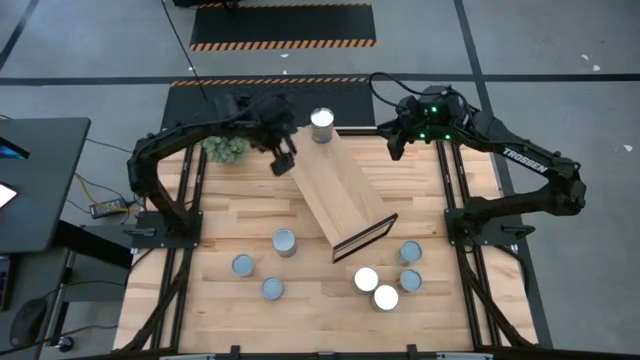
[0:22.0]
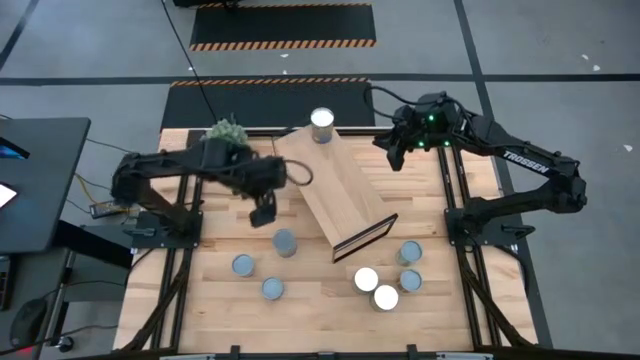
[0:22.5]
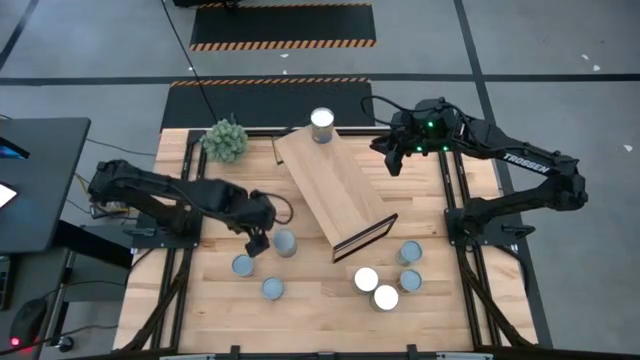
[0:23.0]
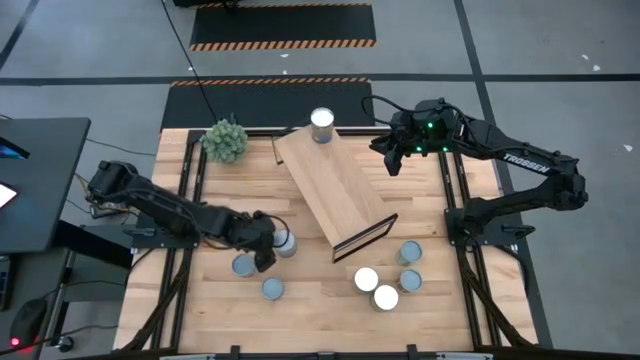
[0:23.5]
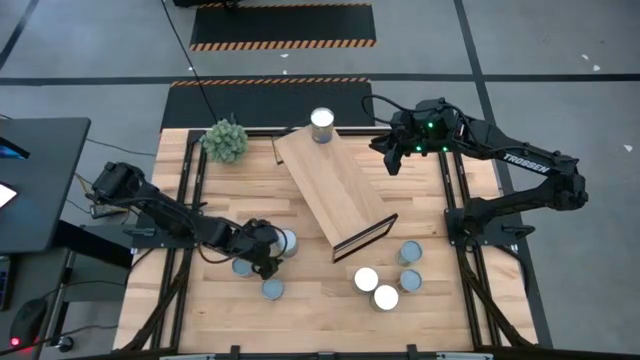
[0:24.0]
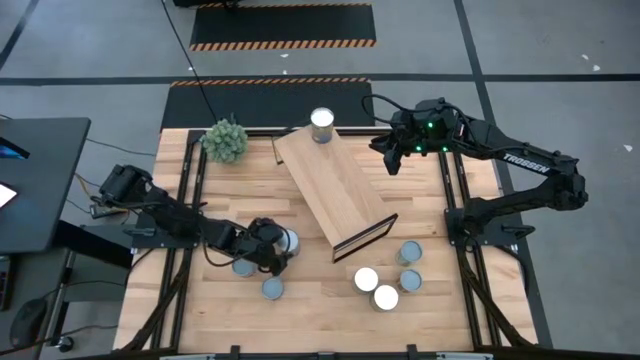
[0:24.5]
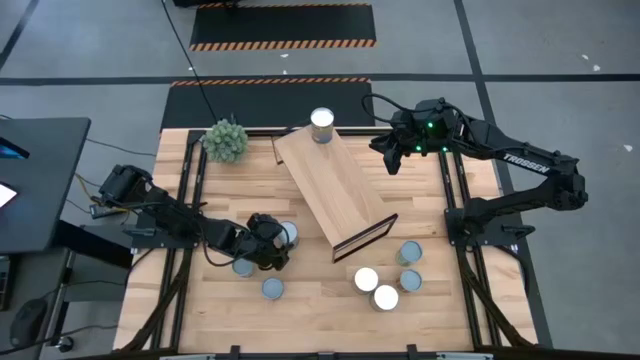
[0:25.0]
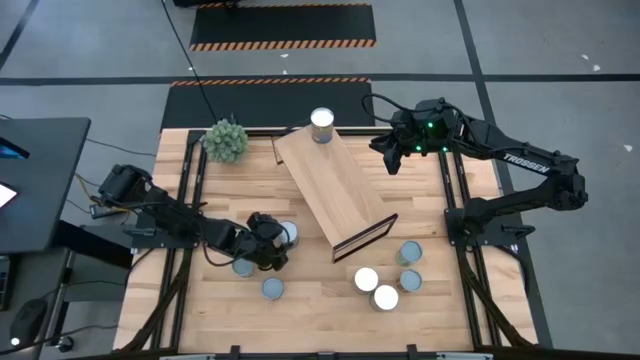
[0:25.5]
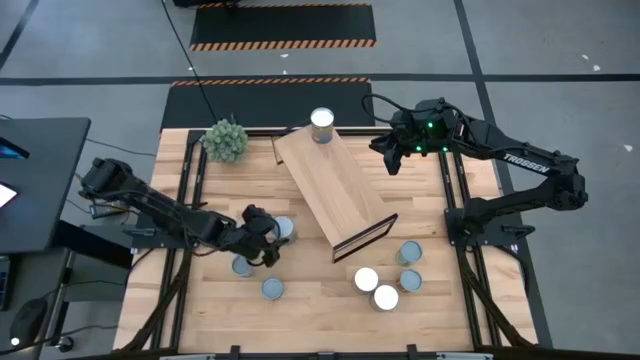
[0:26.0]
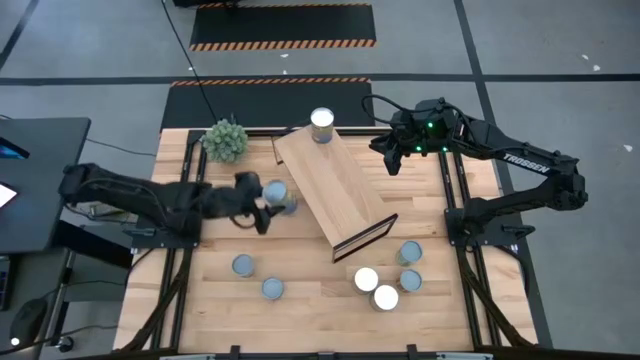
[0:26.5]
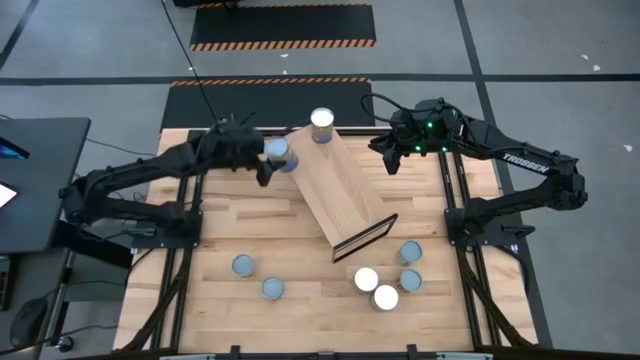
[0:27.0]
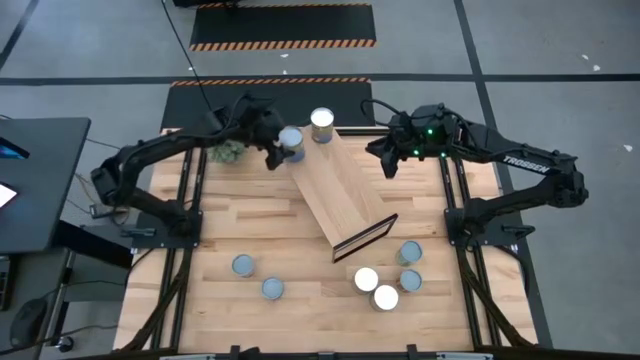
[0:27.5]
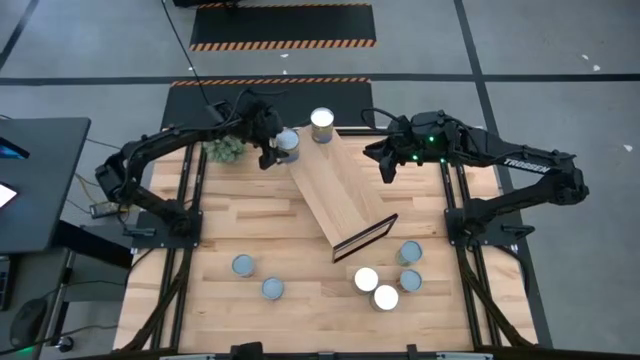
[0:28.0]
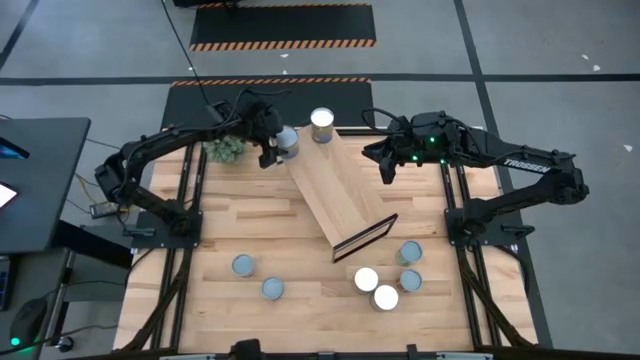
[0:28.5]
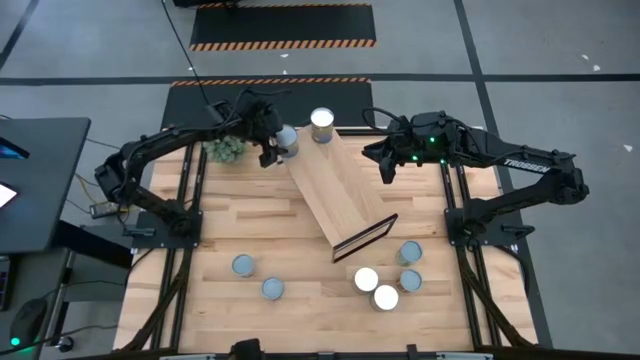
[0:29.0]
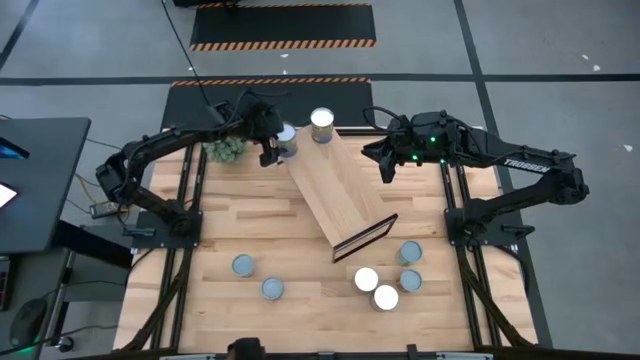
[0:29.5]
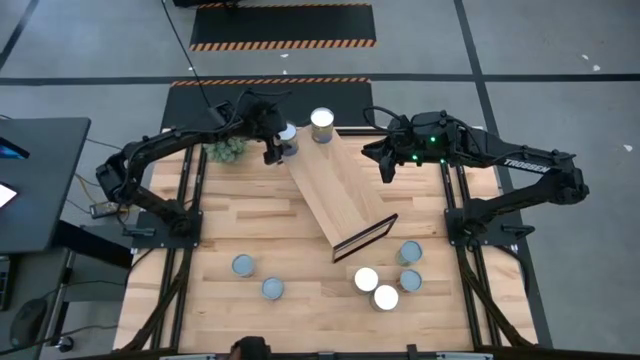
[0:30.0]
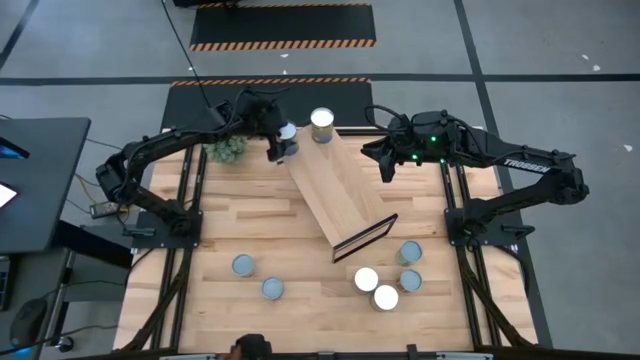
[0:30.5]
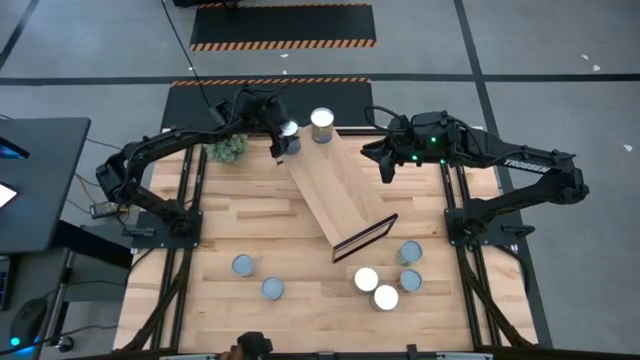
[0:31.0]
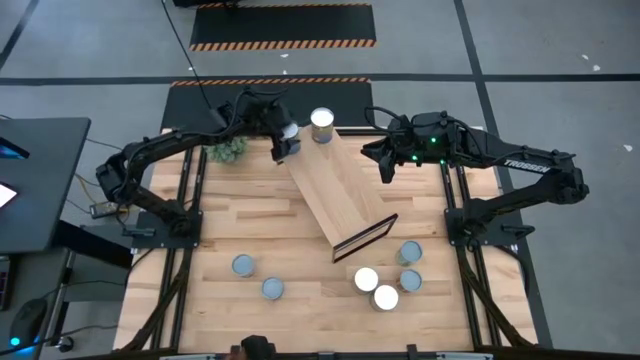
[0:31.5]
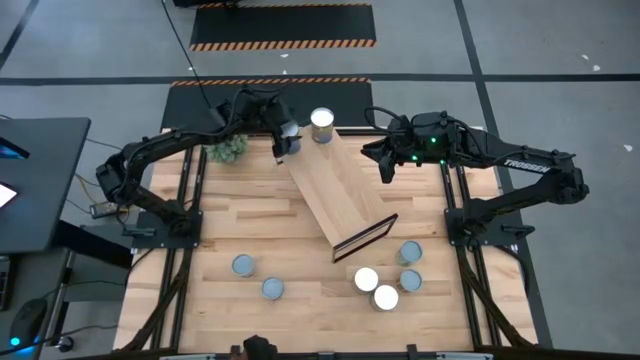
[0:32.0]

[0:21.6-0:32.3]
Task: Pick and place cans onto a shelf
Put the canned peas on the shelf

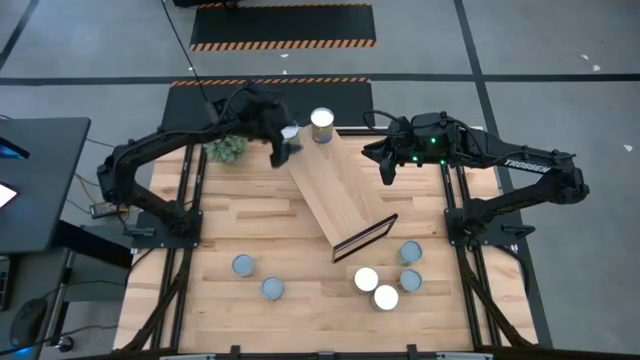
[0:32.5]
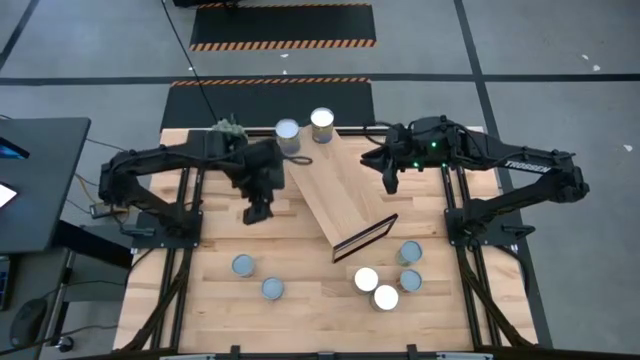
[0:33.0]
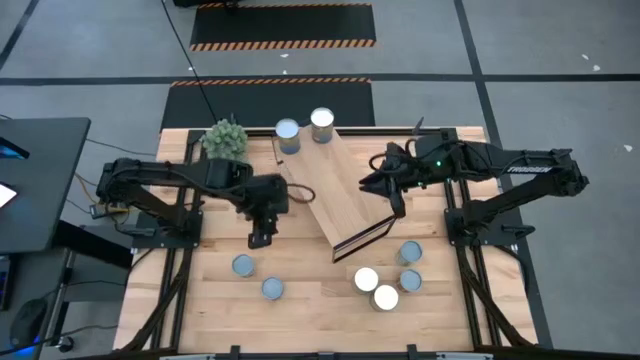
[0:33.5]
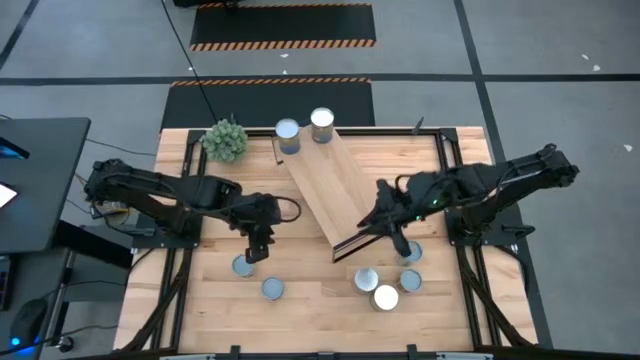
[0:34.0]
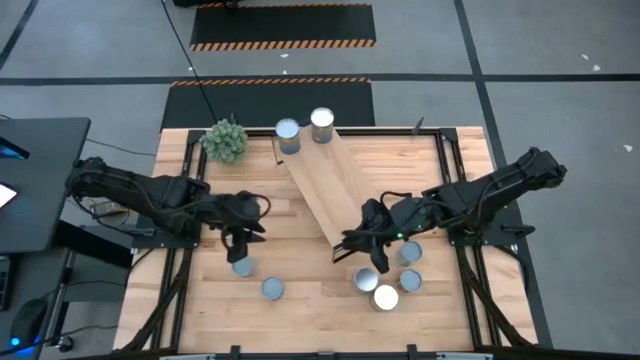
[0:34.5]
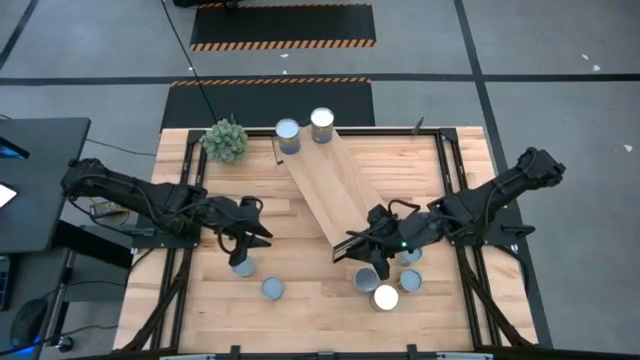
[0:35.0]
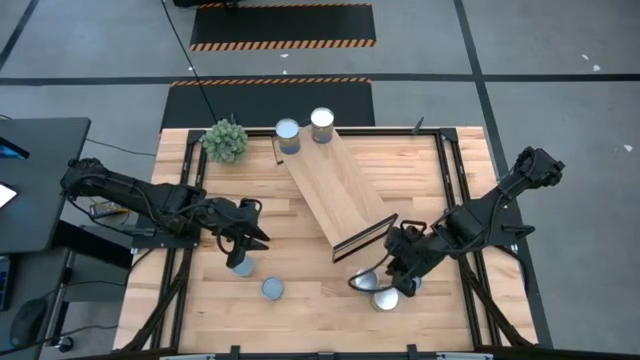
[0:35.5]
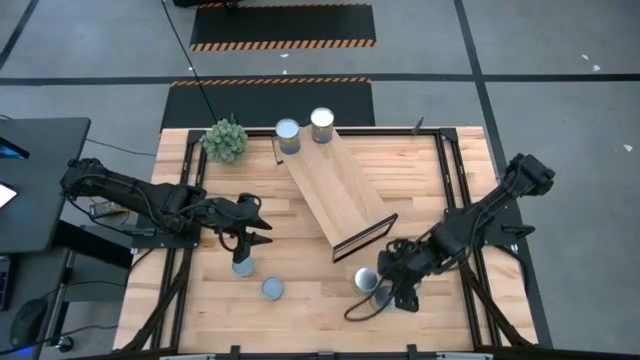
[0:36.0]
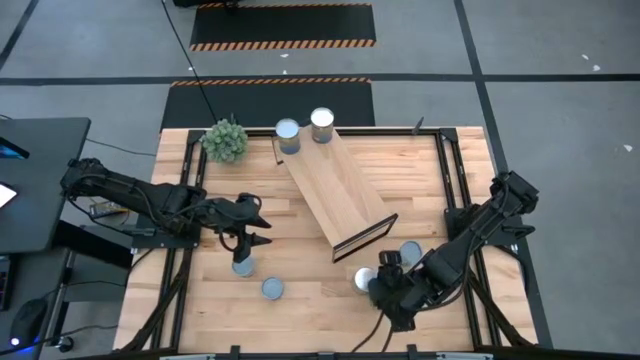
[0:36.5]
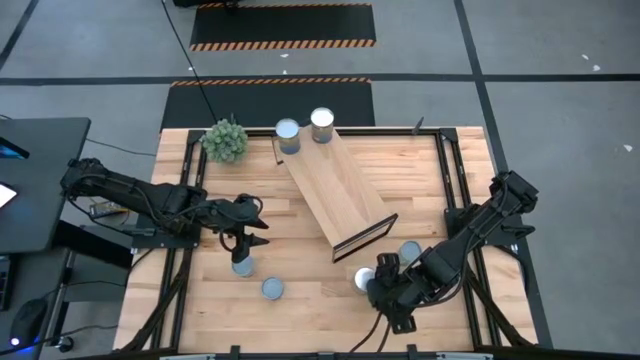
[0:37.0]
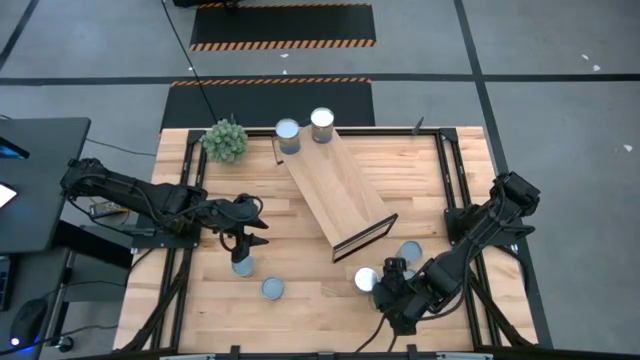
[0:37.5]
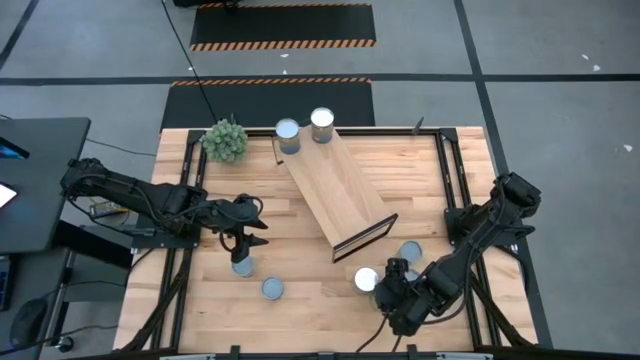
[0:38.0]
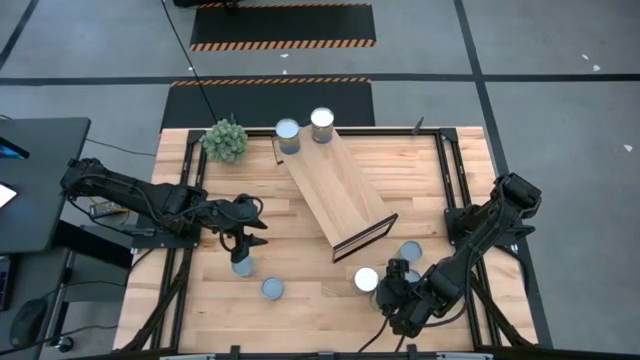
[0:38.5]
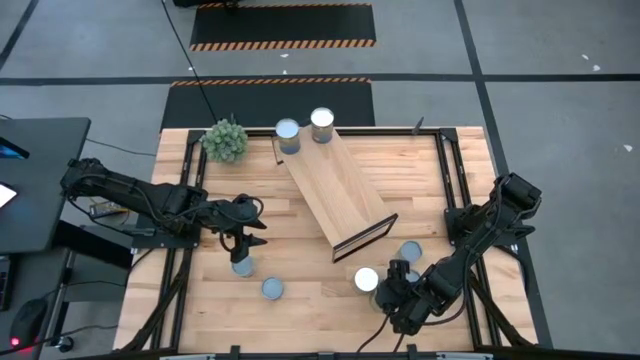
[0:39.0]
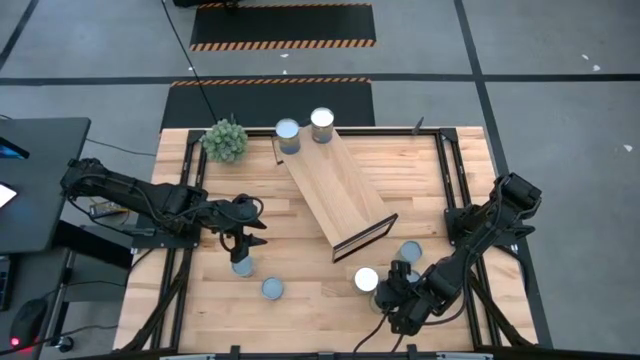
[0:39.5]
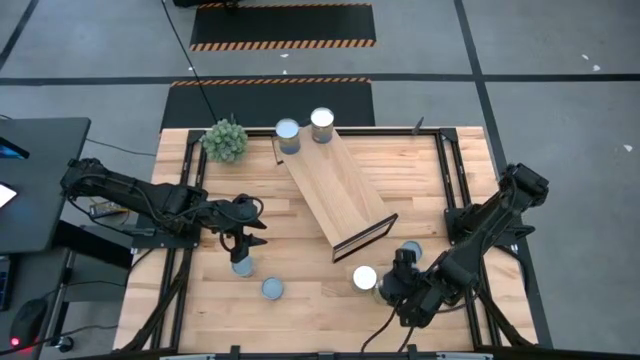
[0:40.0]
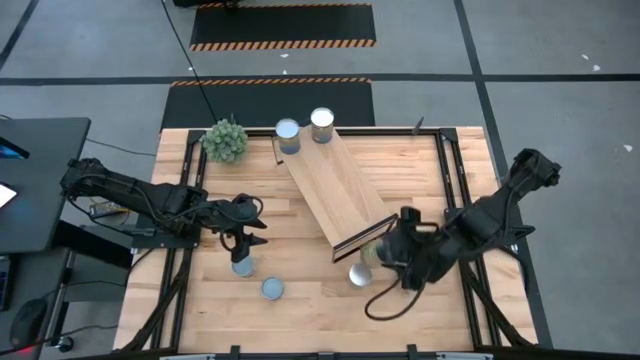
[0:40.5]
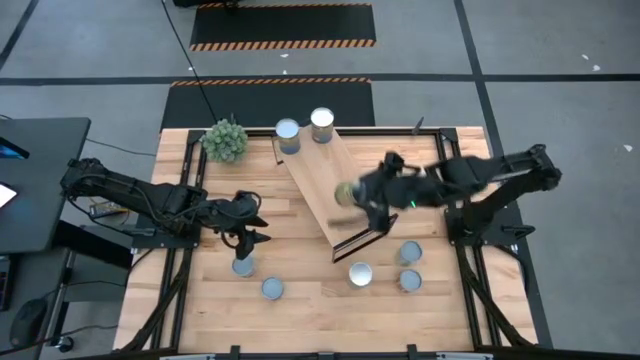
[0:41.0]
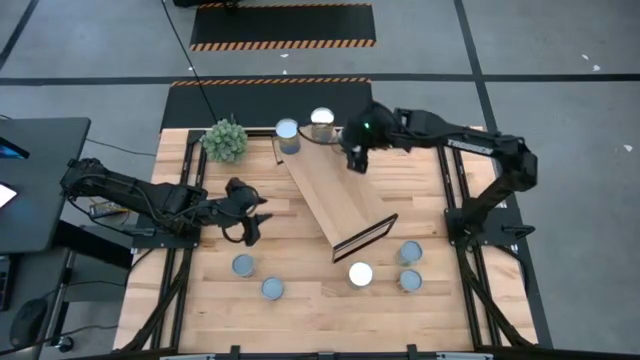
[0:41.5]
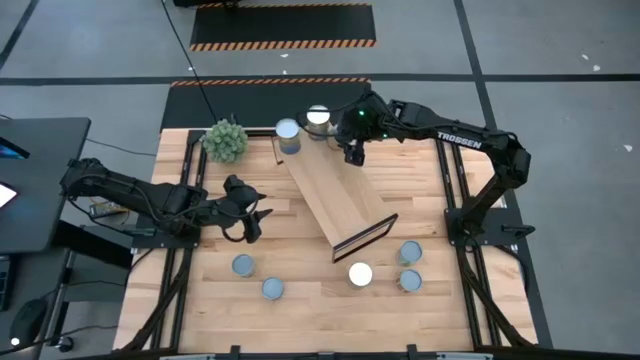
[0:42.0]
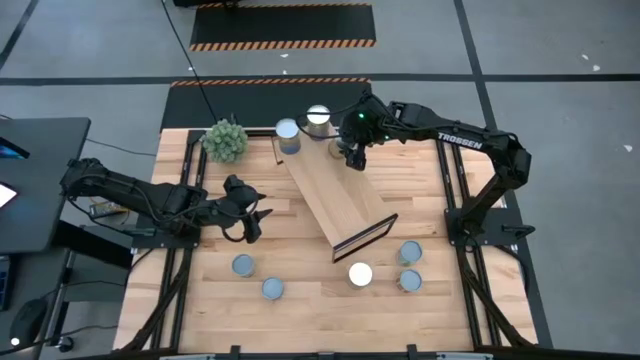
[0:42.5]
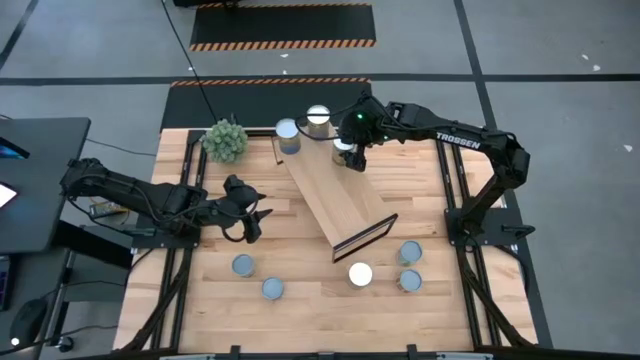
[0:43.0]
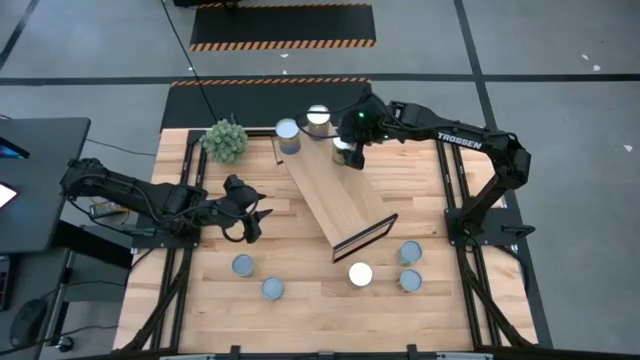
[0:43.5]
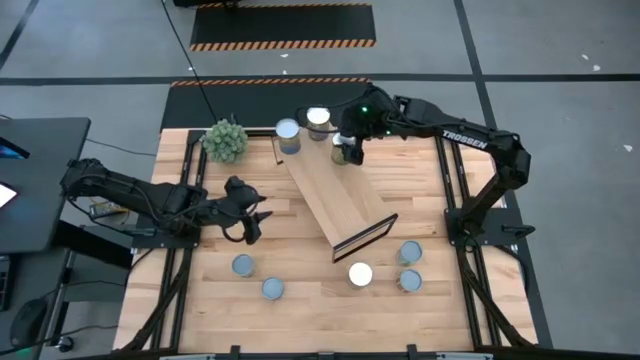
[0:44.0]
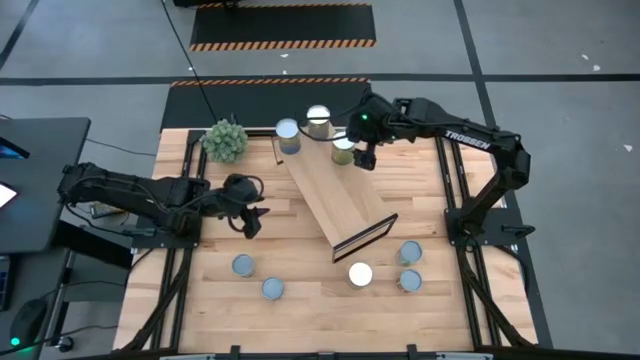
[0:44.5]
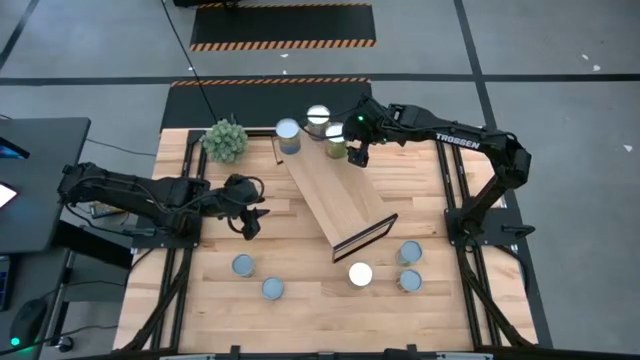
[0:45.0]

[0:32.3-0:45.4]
Put the canned oranges on the shelf
